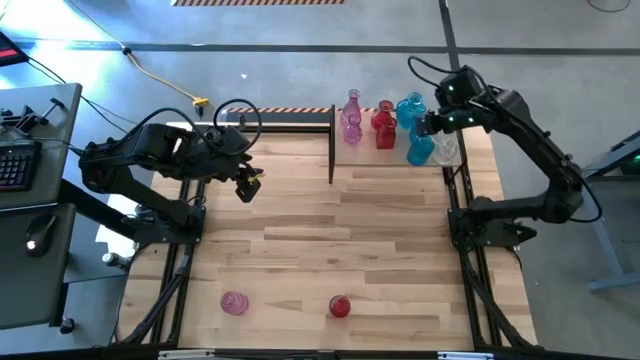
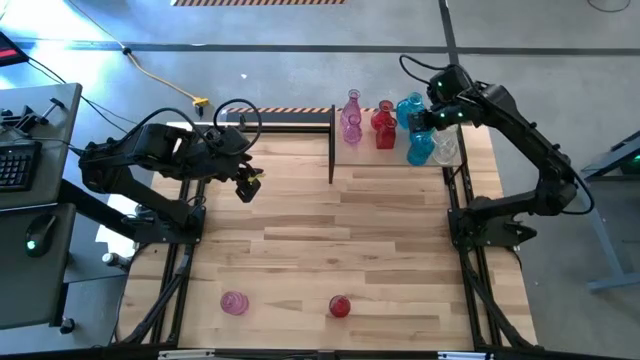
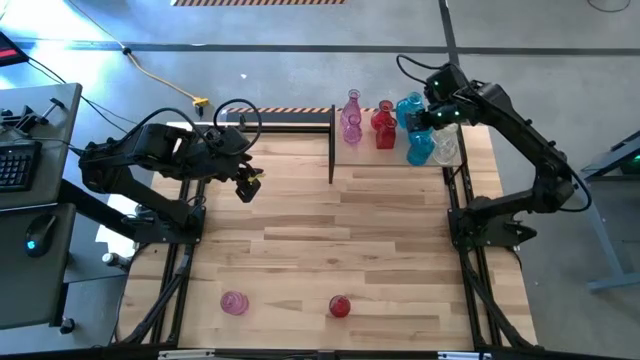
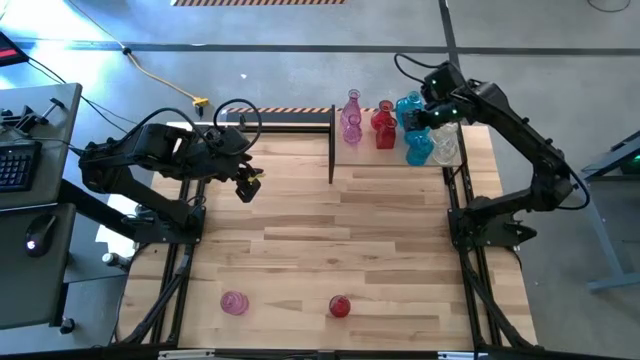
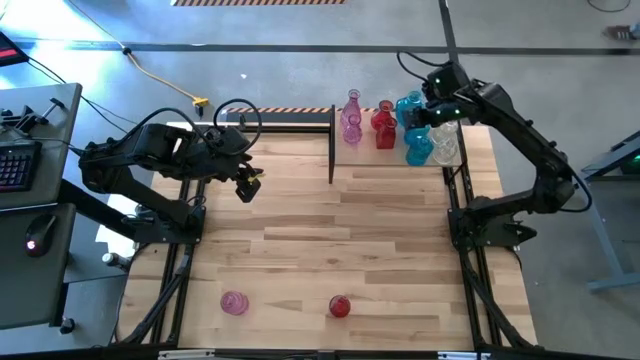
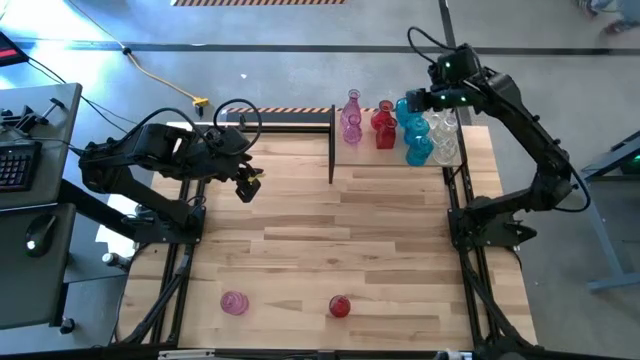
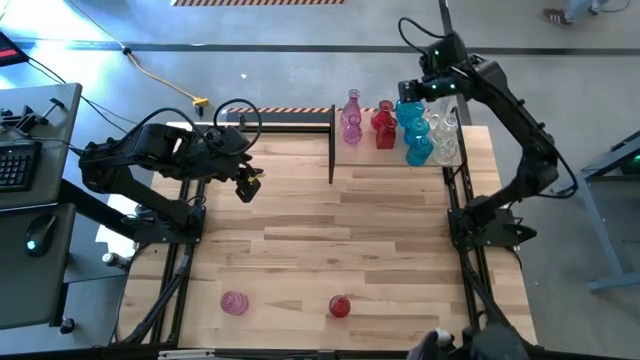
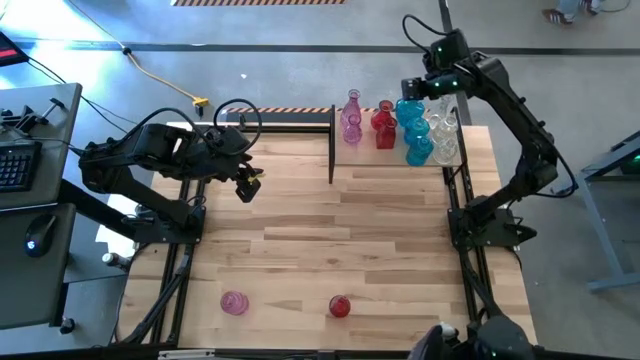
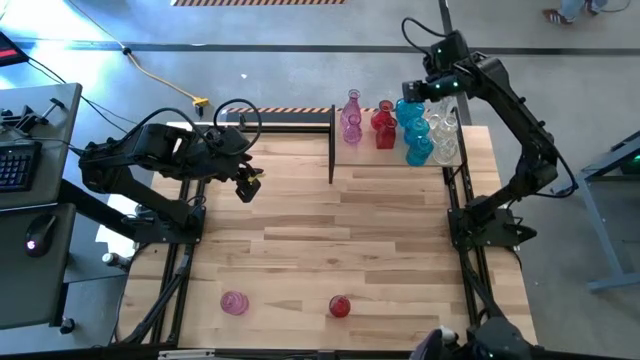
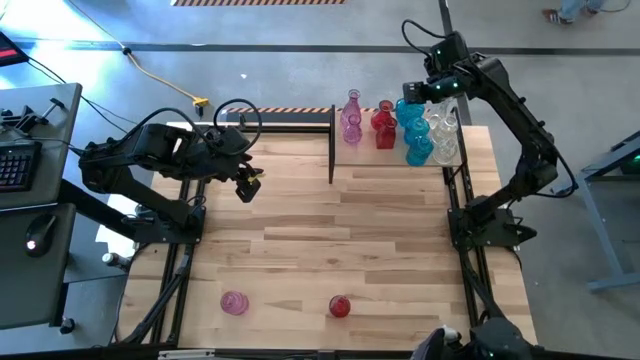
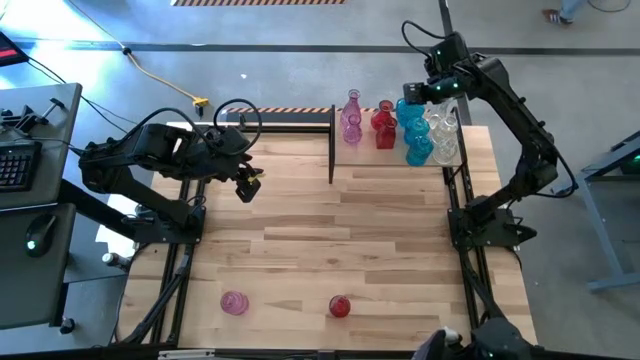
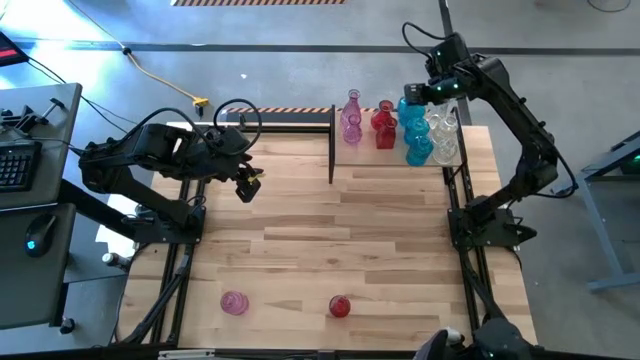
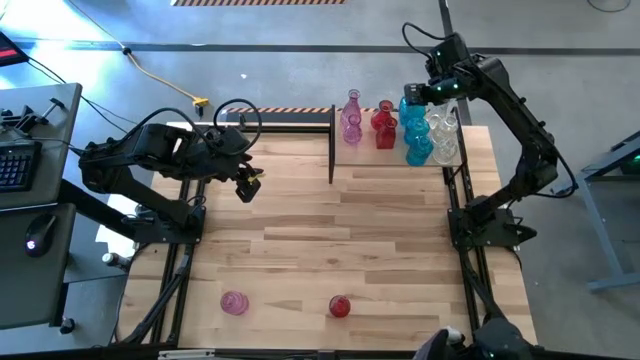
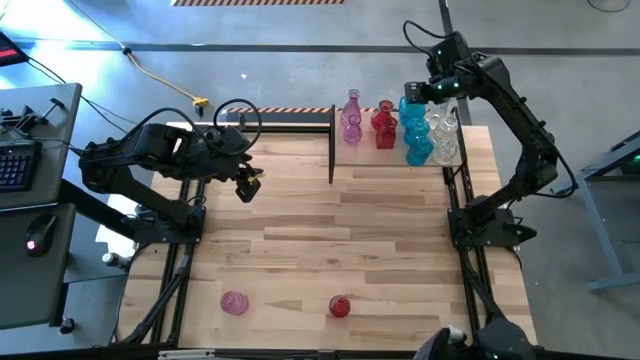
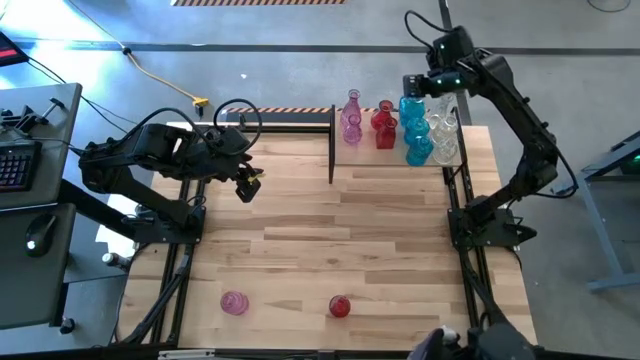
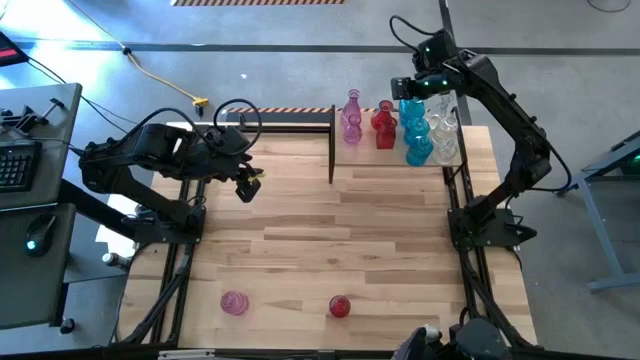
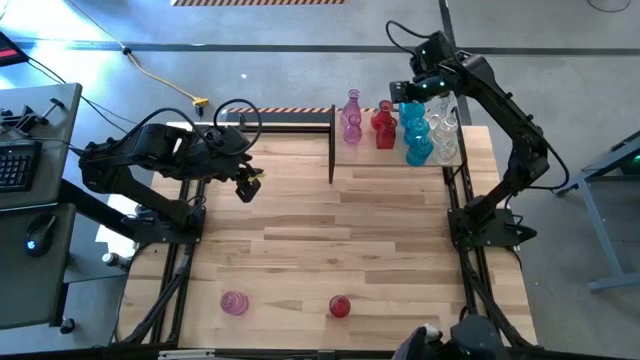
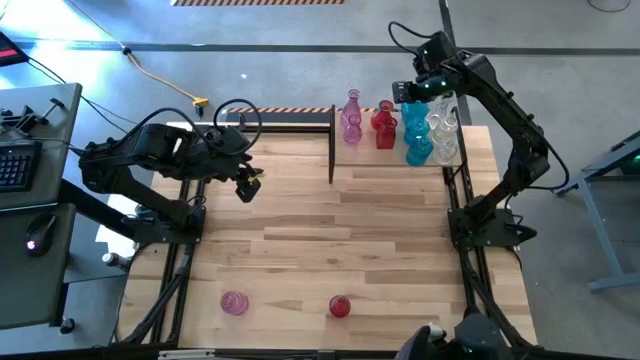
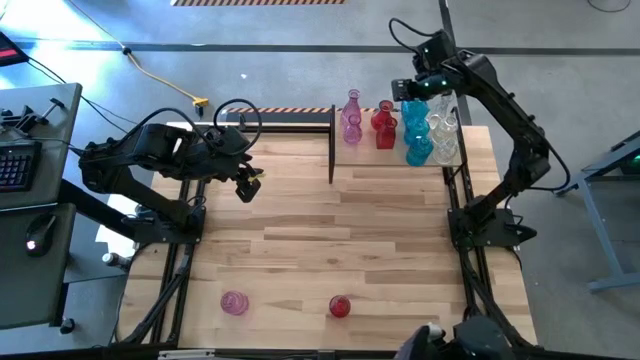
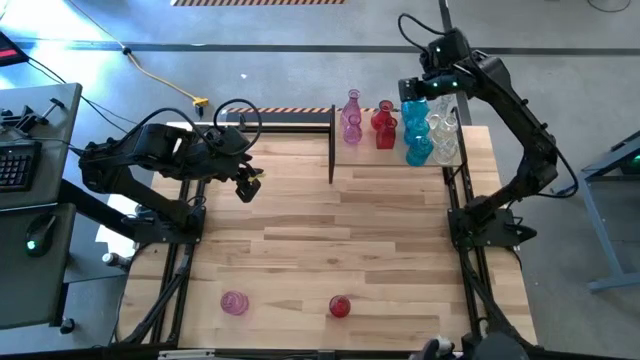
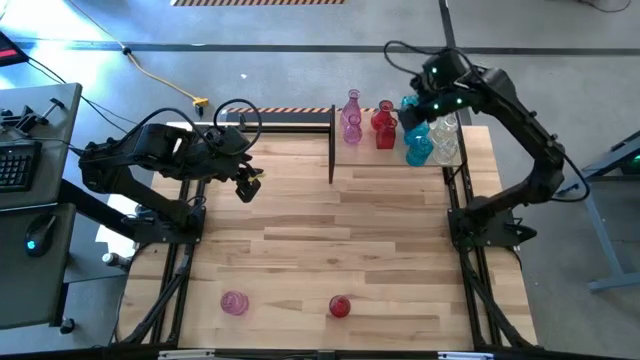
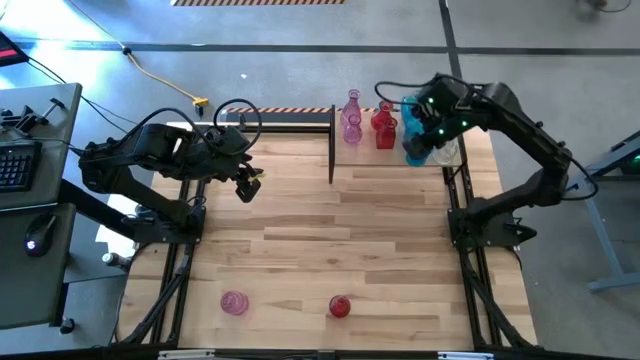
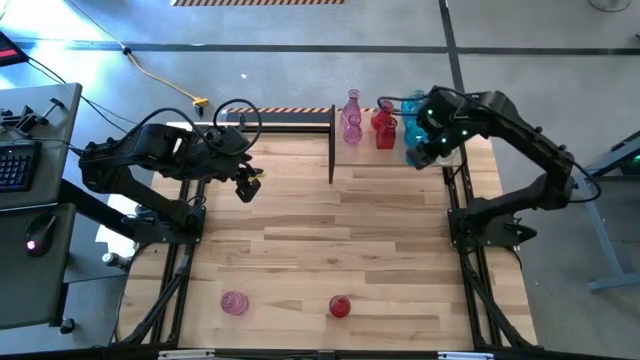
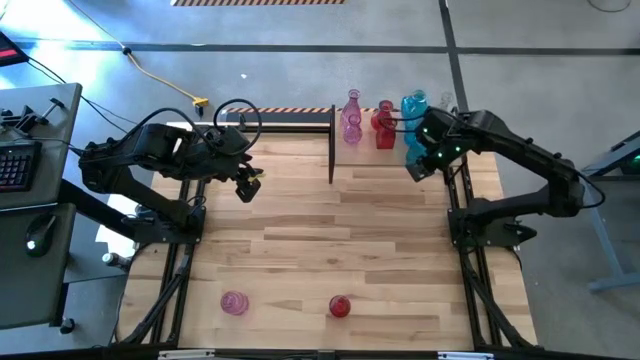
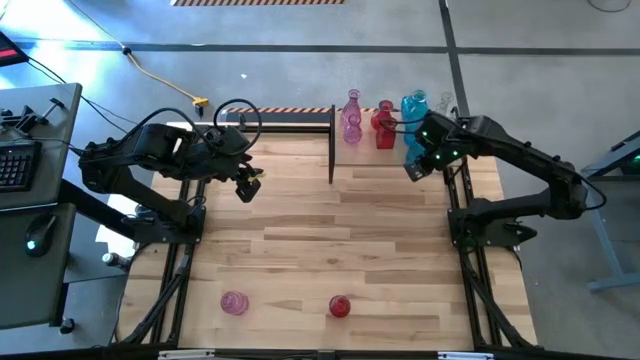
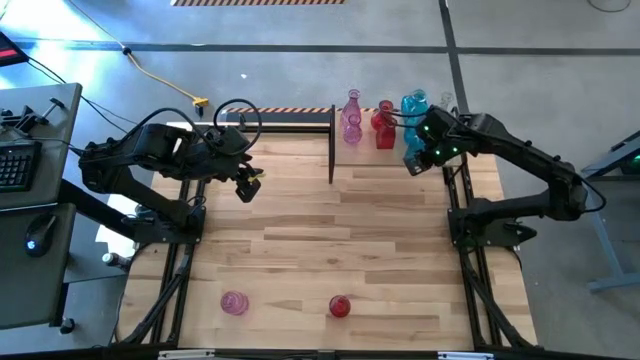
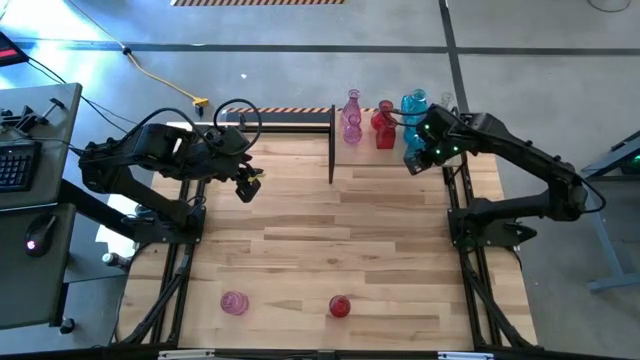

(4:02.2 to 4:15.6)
Task: sort vases onto shelf
Adjust the blue vases on the shelf

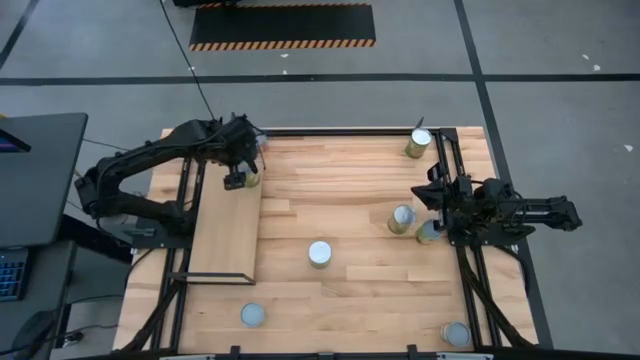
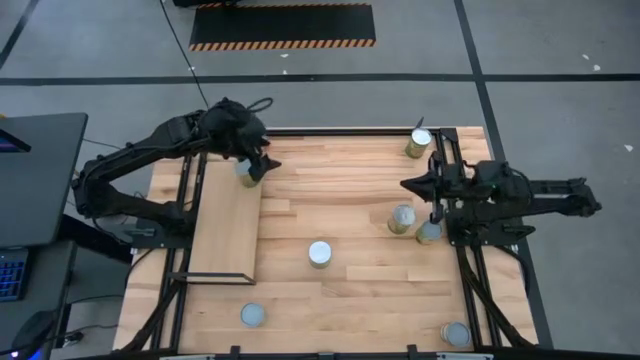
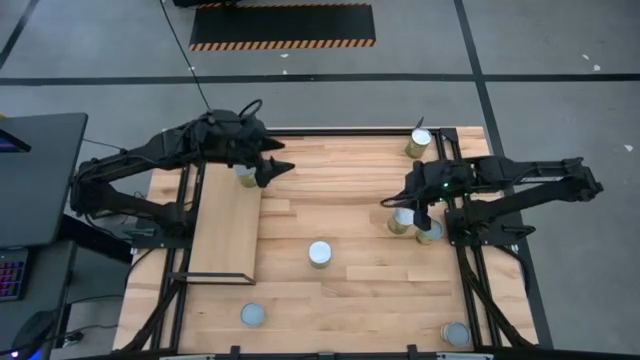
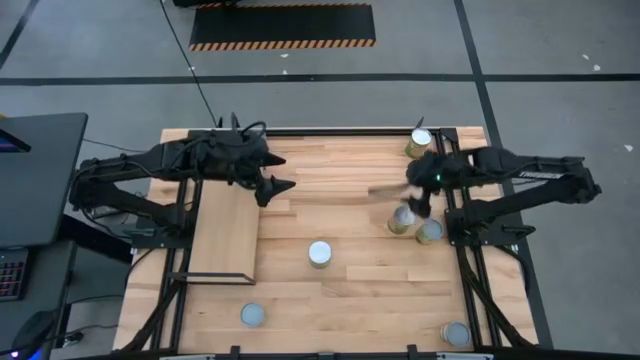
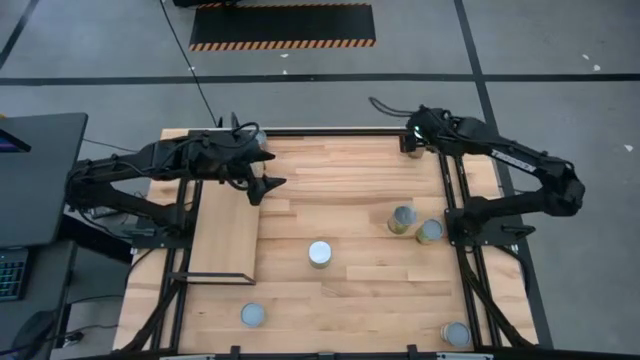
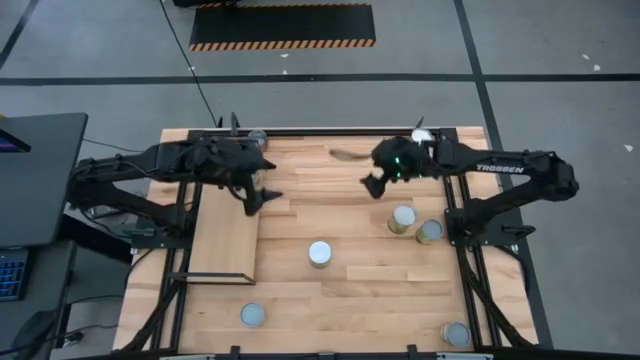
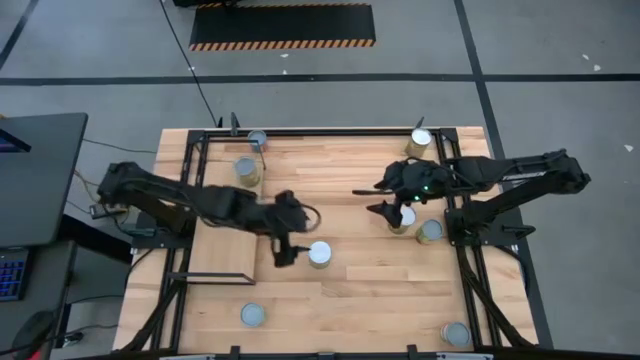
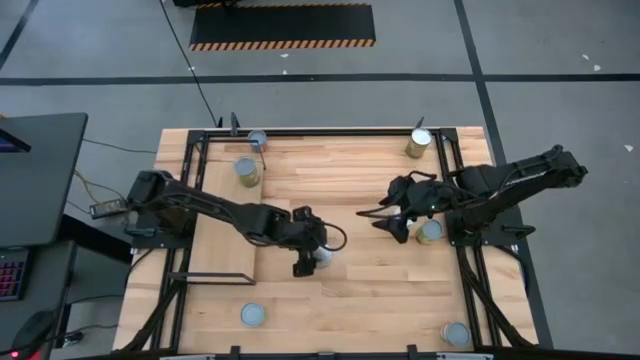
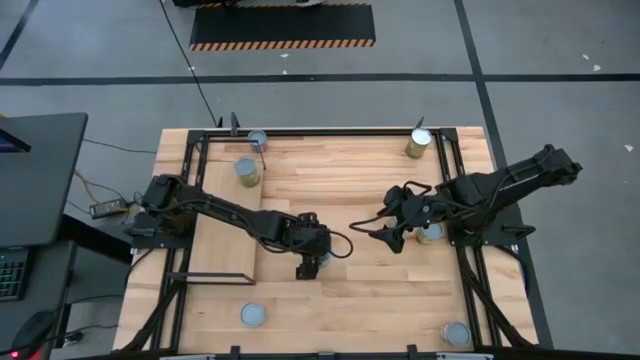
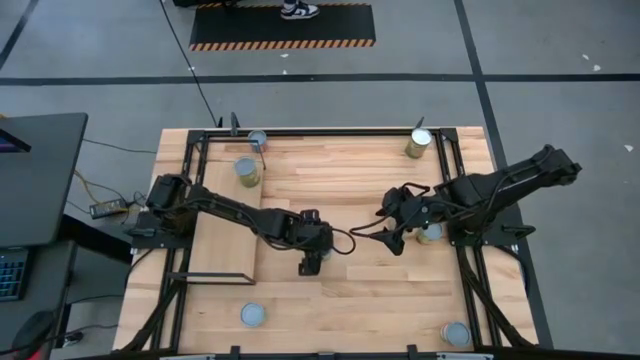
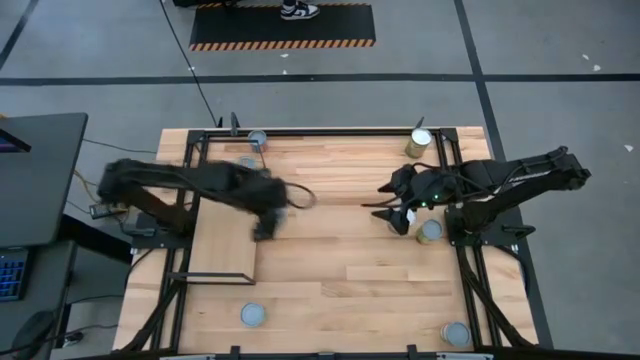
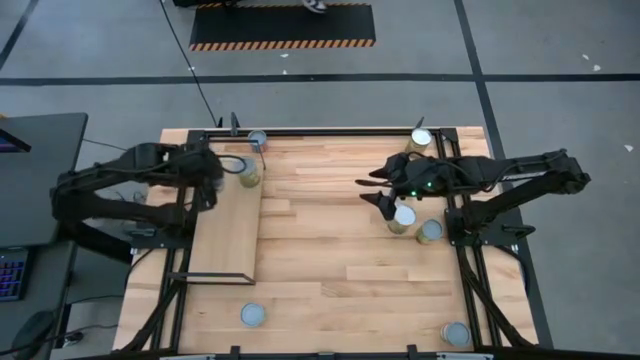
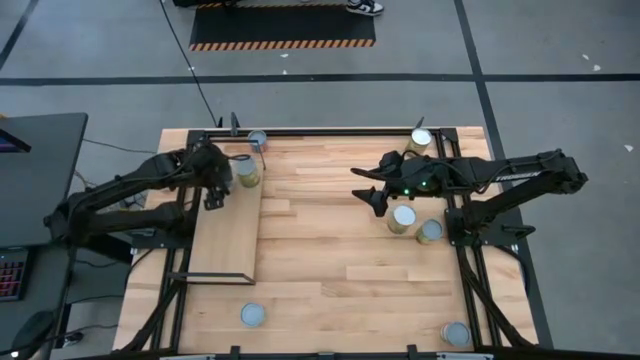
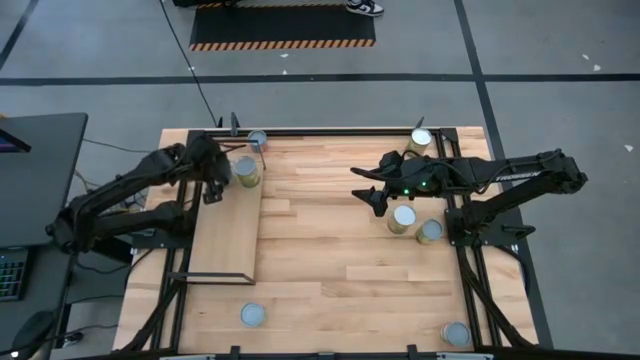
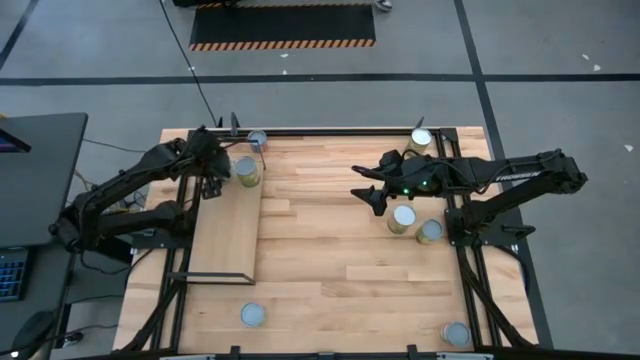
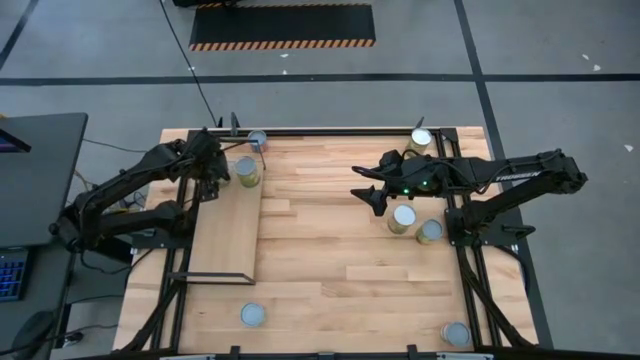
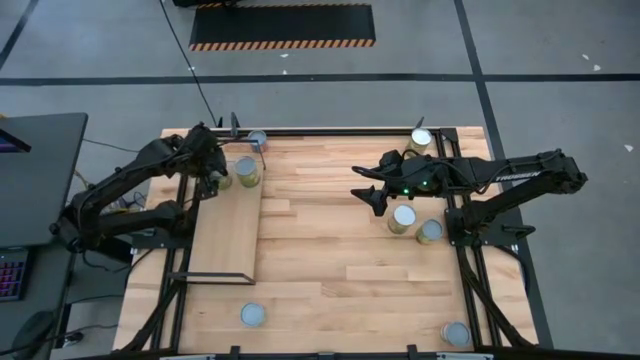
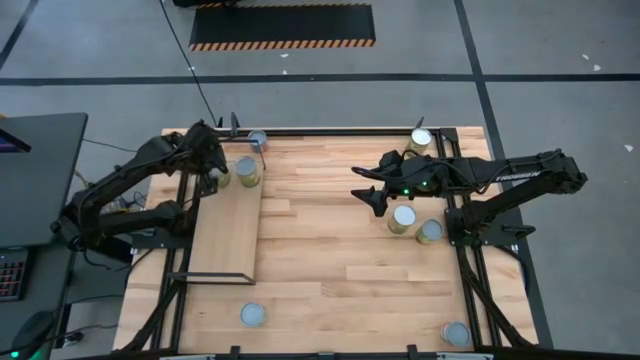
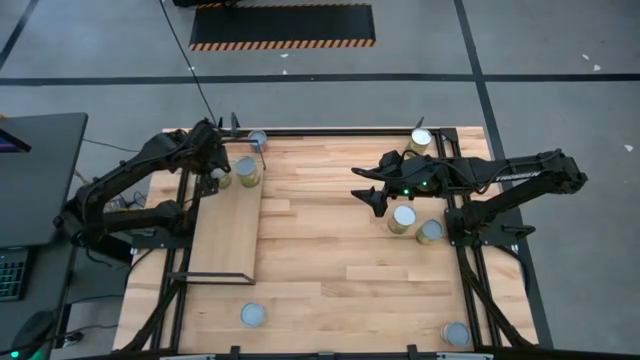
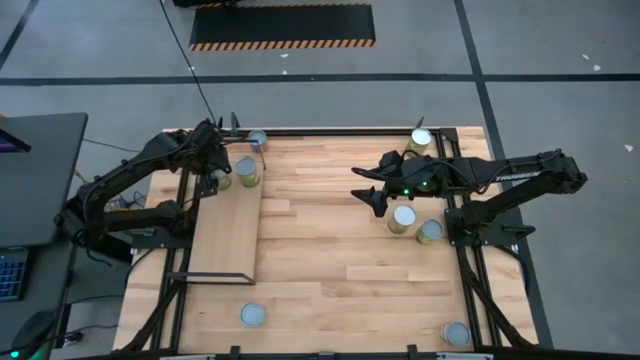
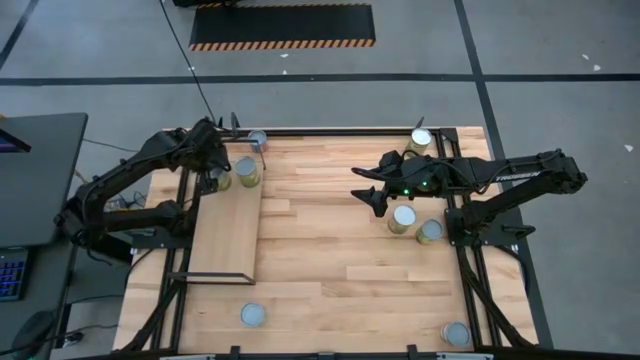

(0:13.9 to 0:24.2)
Task: Pick and place cans onto a shelf
Put the canned pears on the shelf aligned with the other canned pears
